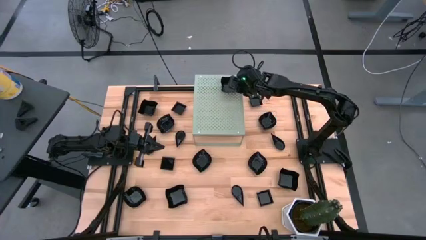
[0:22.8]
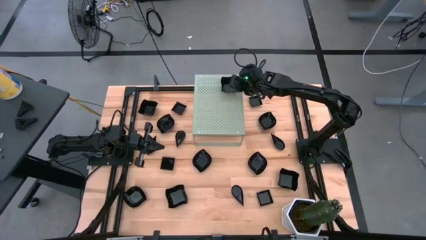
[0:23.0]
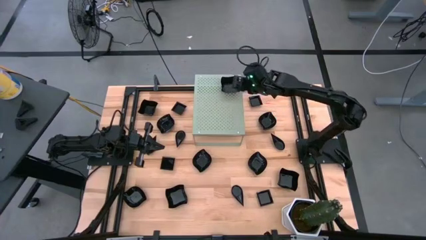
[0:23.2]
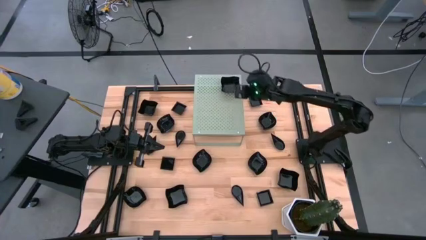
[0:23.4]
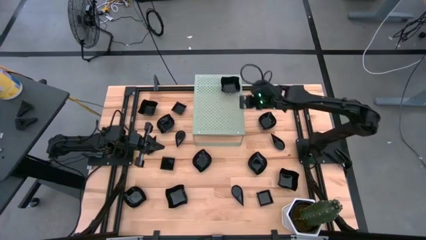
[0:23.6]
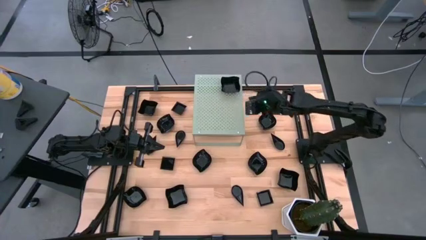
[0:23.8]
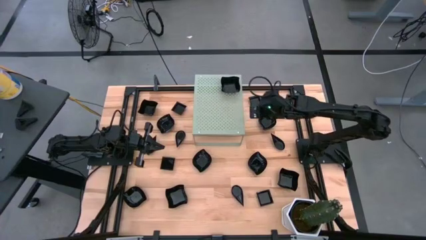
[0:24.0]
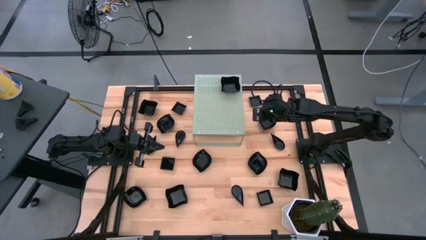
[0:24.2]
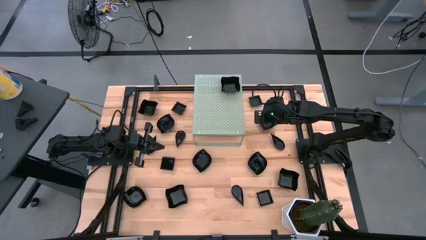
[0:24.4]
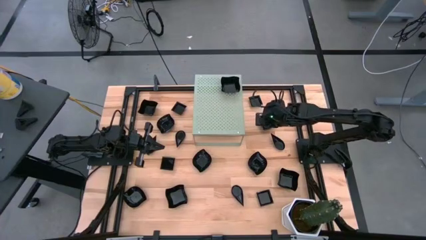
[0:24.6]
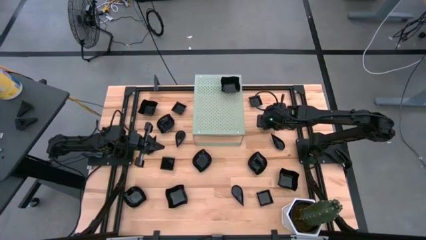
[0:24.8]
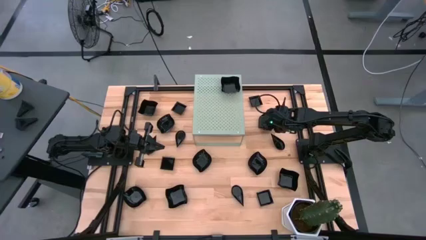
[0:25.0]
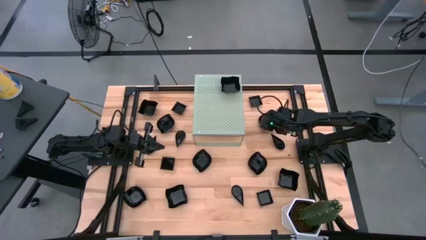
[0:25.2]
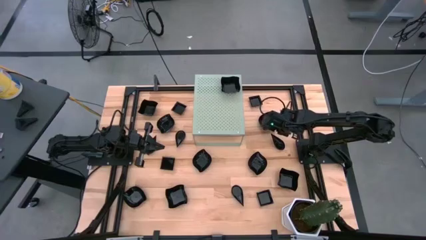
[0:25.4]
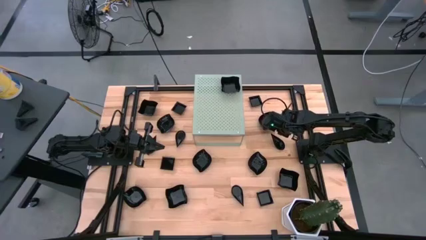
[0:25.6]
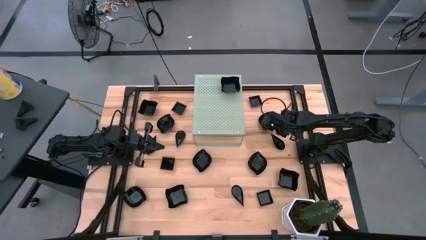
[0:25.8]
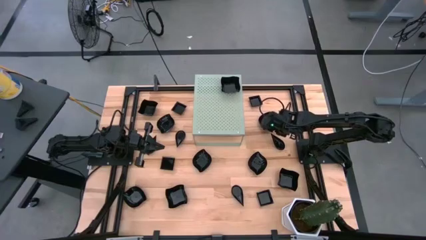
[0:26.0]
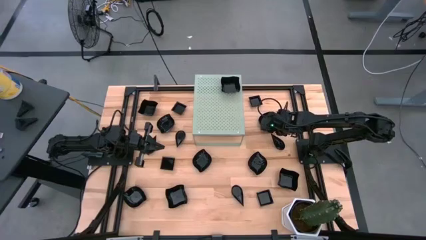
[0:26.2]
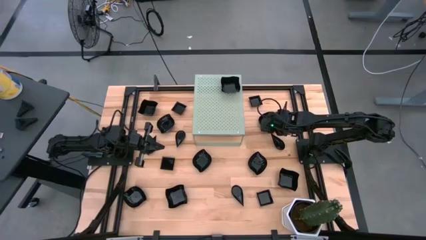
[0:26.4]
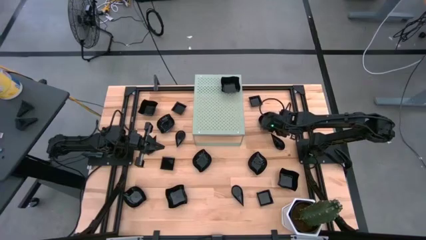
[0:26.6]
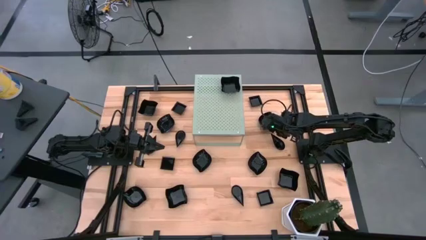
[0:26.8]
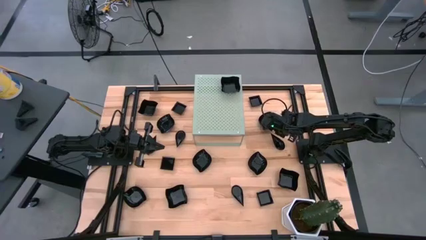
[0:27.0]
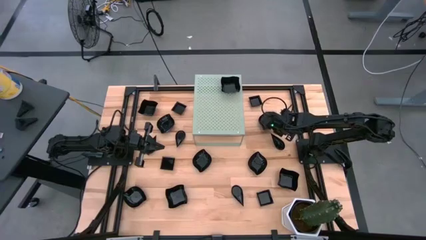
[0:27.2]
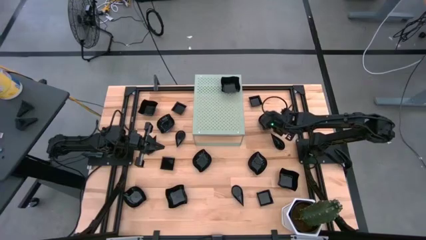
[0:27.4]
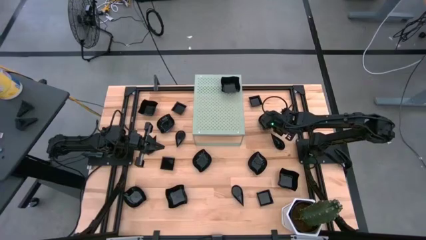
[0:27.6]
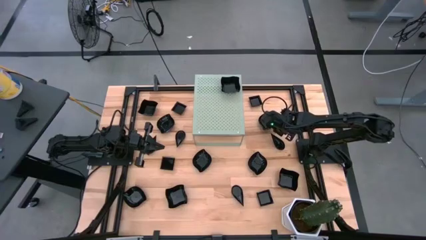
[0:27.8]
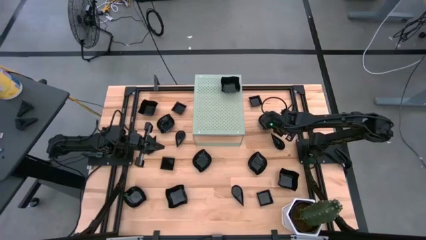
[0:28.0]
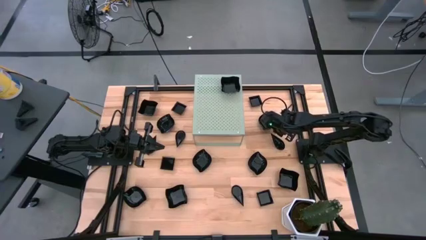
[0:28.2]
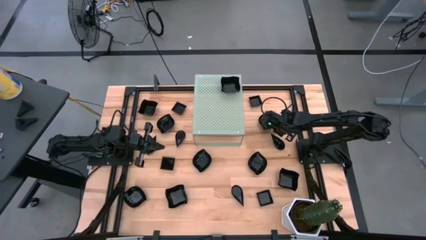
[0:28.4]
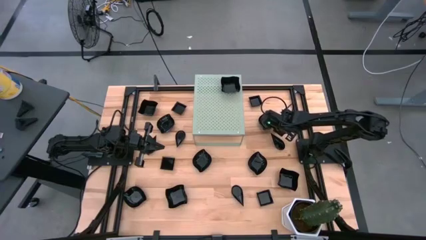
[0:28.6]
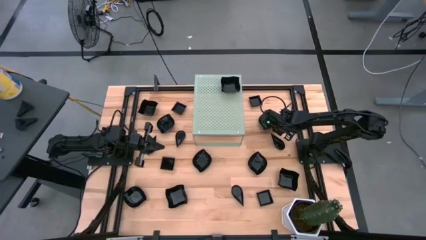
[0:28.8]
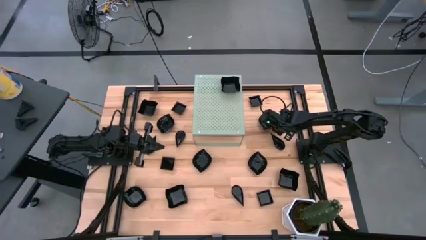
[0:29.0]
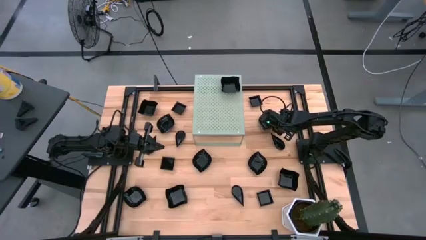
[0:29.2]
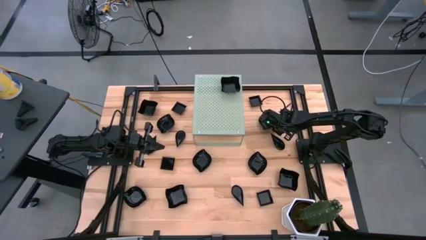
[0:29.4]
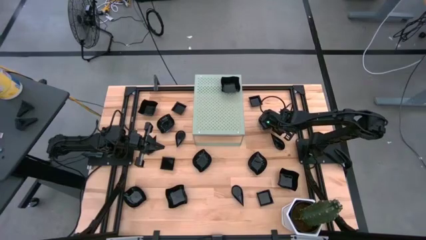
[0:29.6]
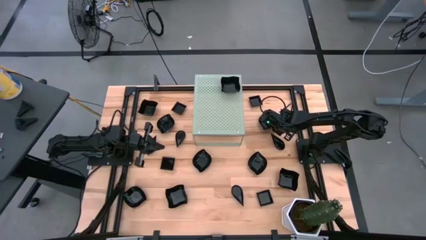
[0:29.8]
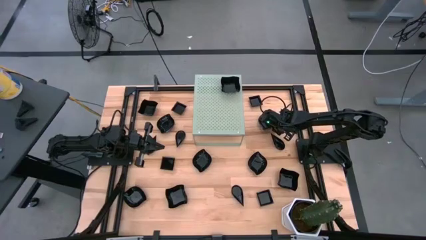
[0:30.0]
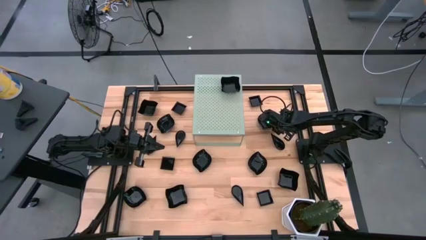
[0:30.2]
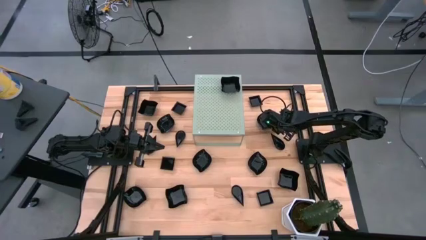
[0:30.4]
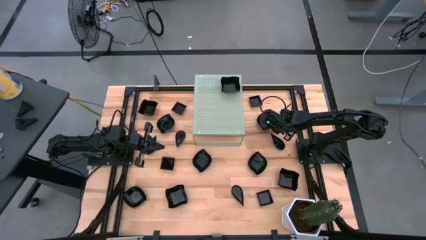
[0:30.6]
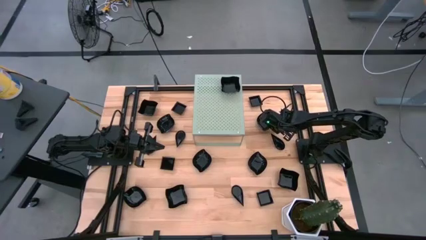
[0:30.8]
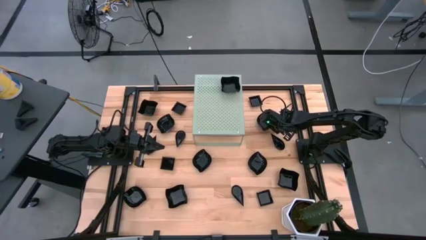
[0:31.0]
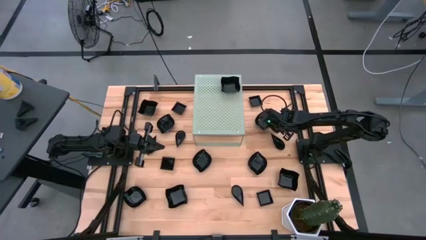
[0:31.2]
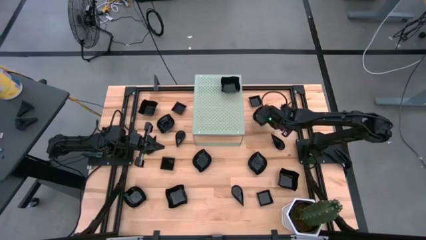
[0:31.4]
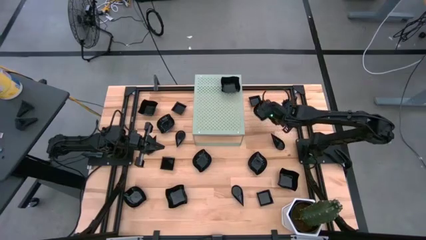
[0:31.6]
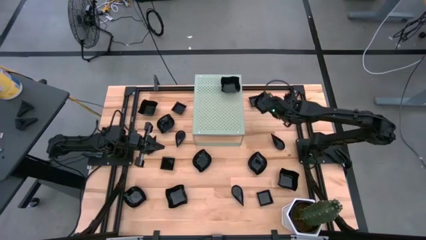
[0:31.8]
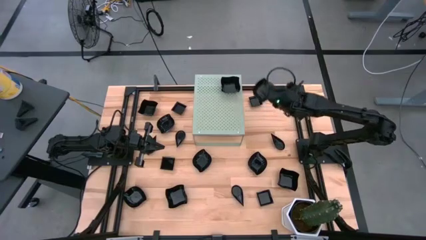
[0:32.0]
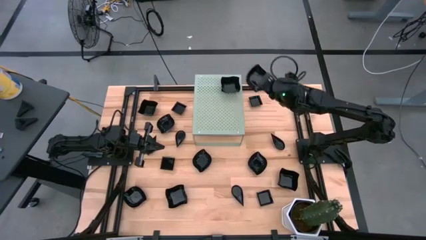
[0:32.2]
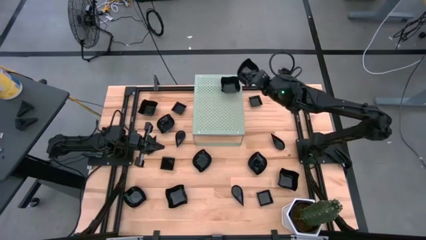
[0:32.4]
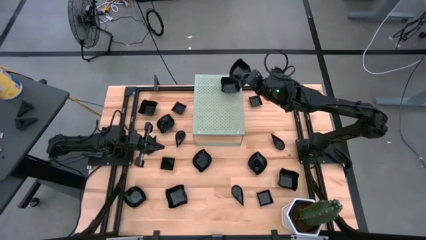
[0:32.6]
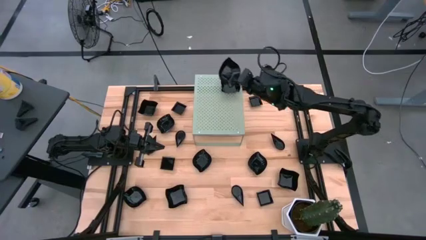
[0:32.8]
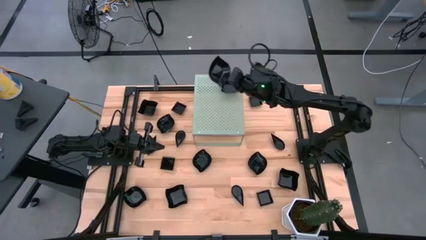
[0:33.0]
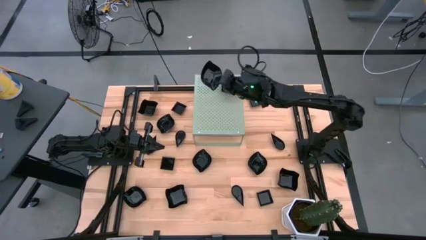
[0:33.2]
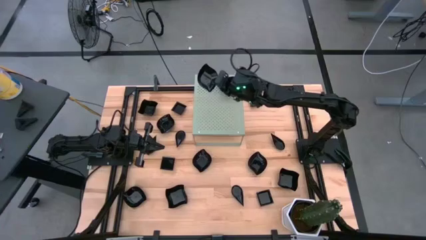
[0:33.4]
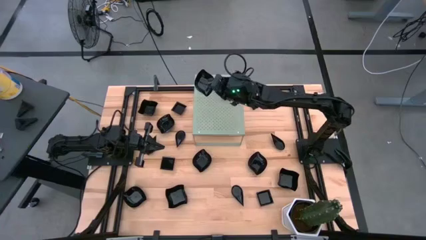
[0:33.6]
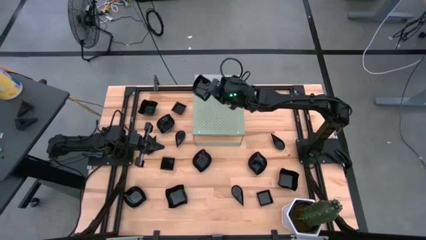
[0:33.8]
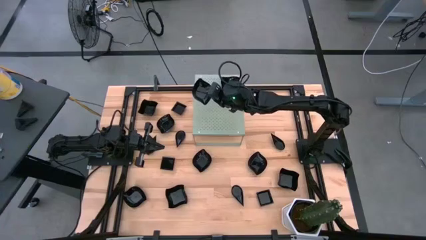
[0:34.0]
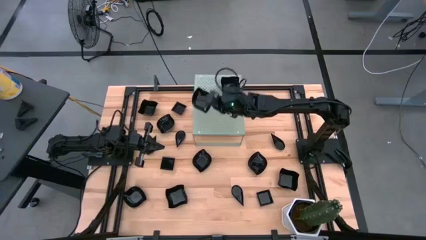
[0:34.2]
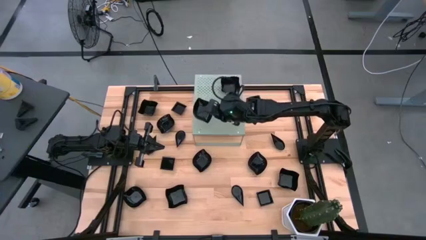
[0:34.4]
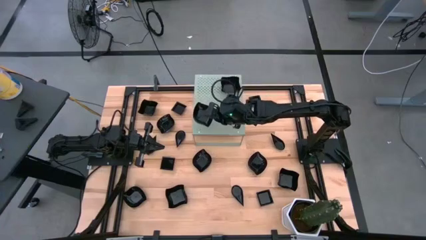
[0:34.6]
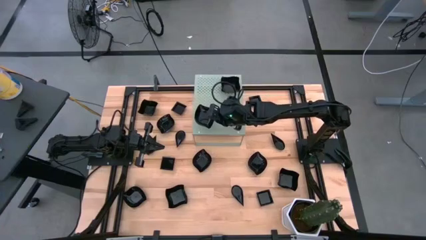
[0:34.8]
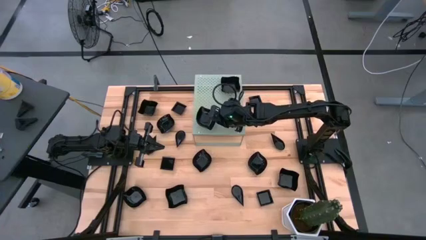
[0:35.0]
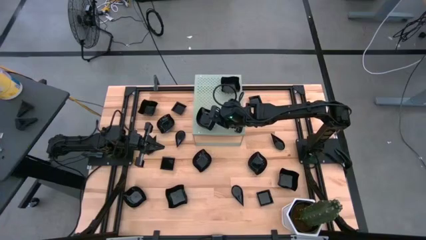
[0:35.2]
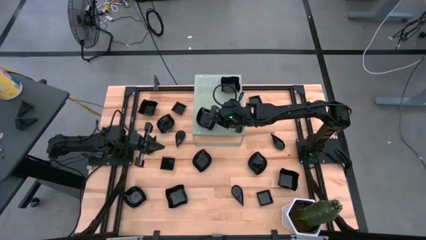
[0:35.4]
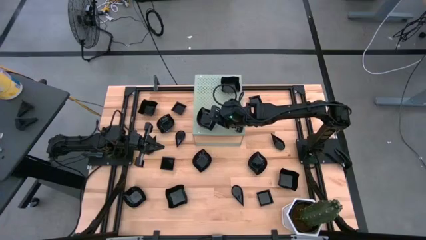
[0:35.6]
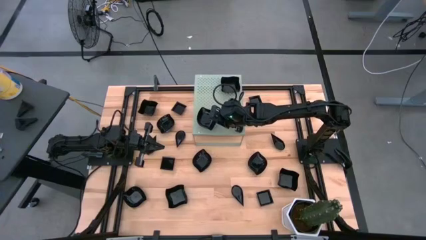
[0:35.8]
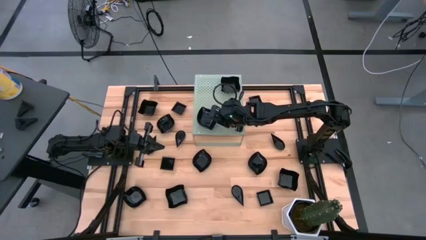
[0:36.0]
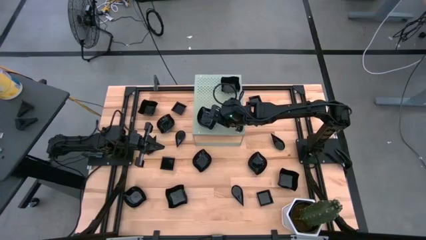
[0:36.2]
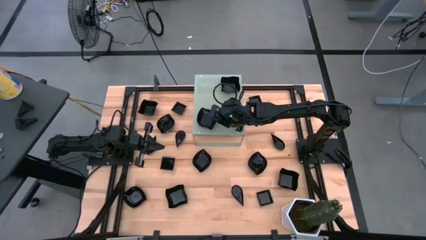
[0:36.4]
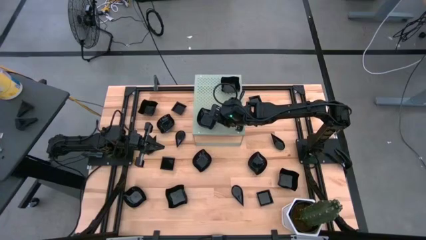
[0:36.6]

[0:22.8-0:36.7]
Task: Pick & Place Mini shaped plates
Put the leaf shaped plate on the shelf
